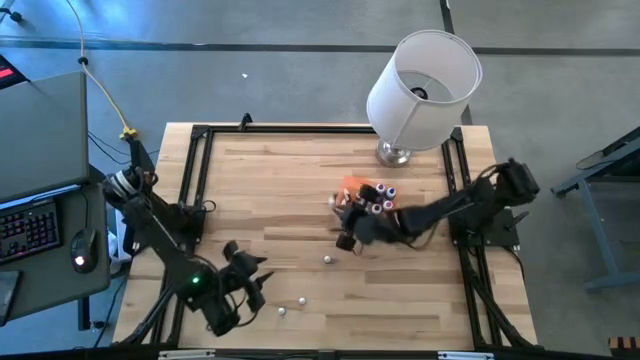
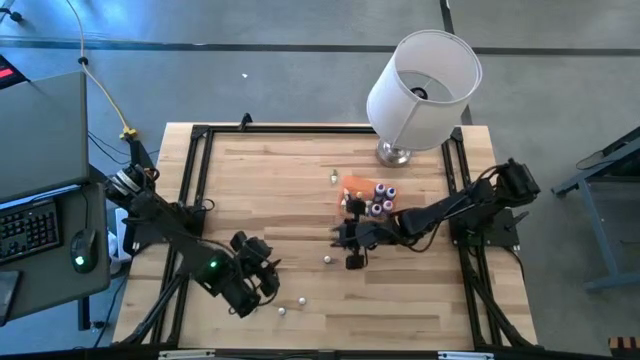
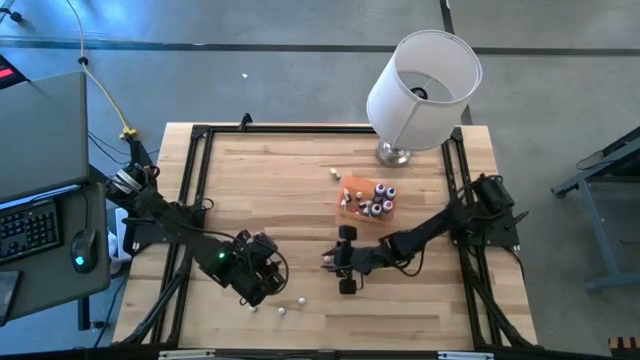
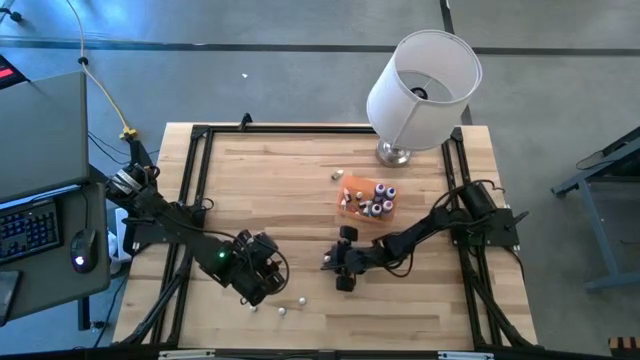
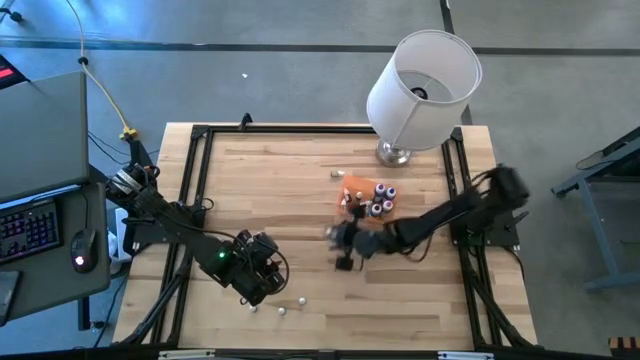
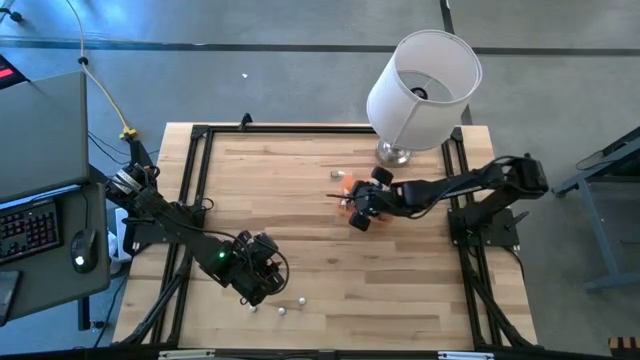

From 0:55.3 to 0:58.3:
Task: Pick & Place food coloring
Put the top small purple food coloring bottle into the orange container

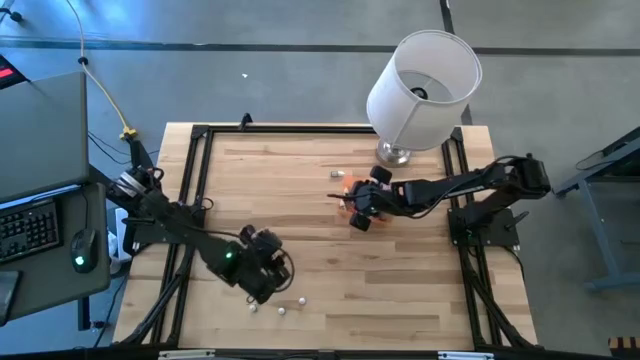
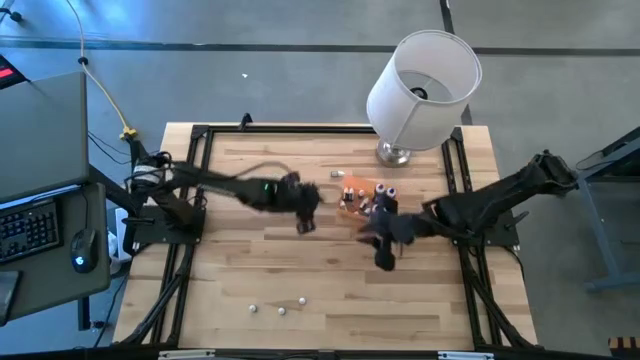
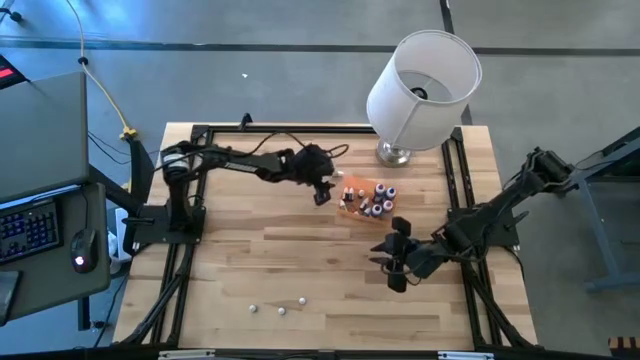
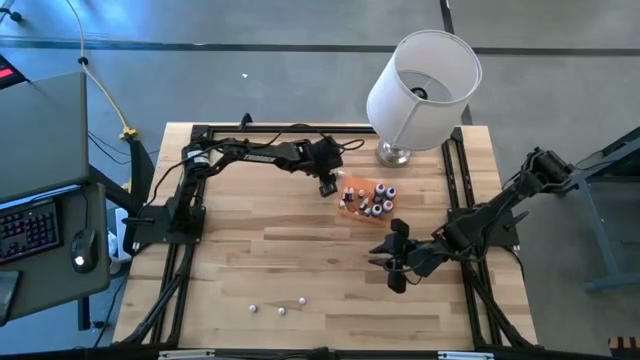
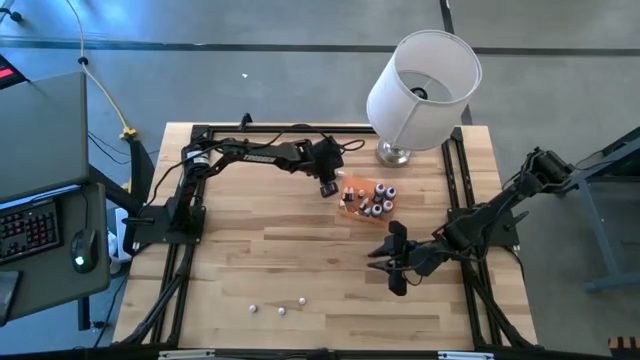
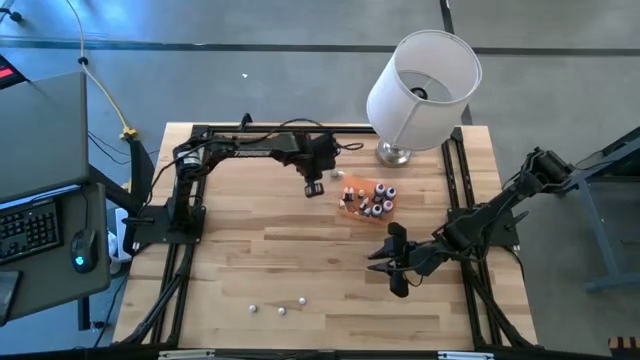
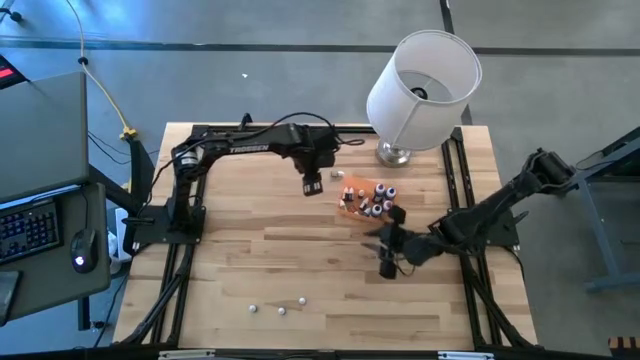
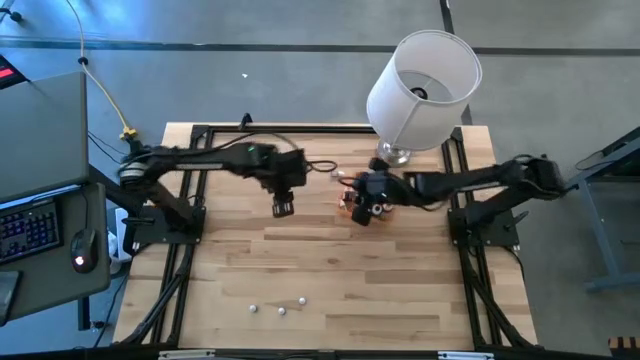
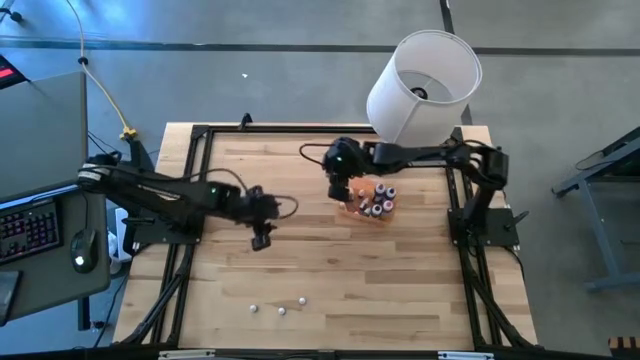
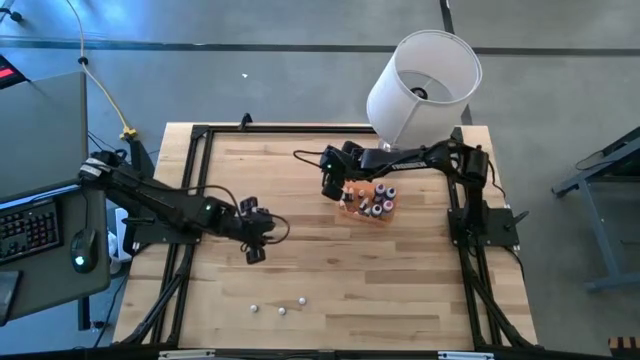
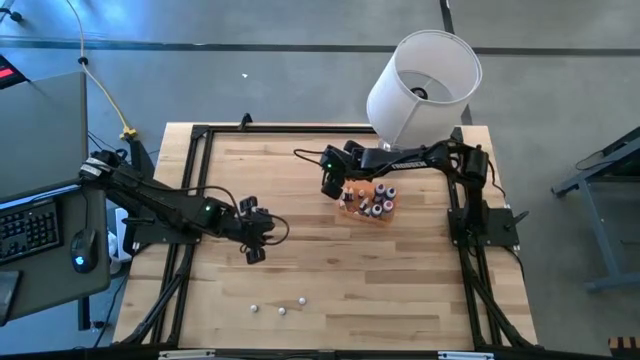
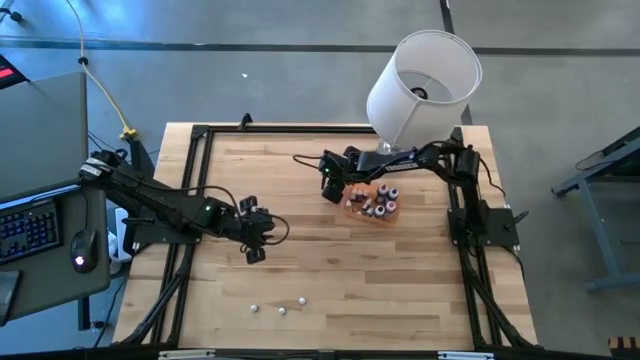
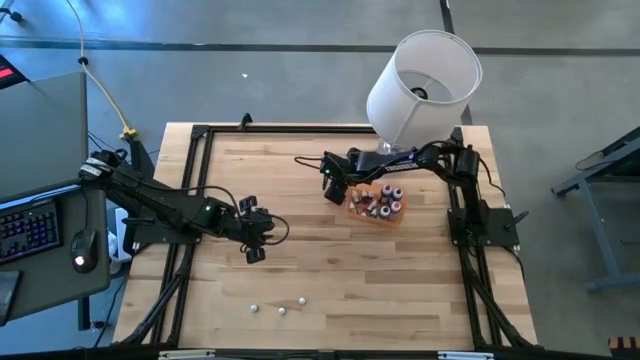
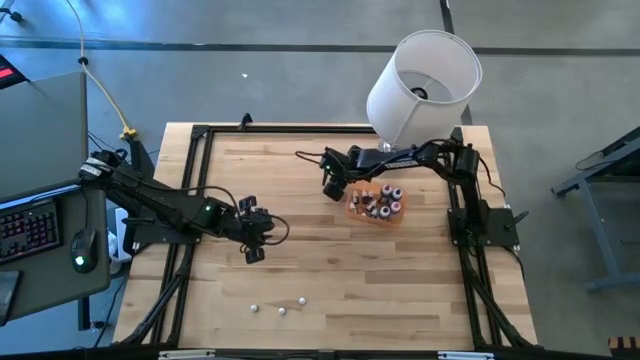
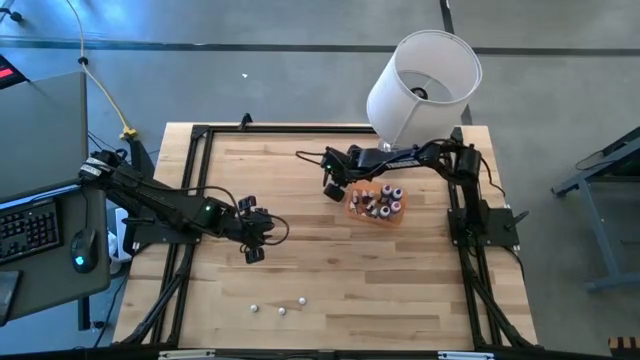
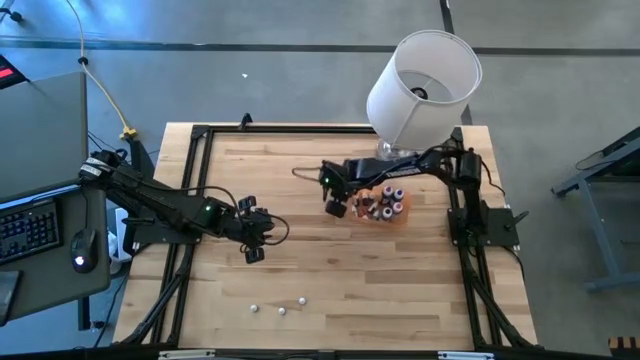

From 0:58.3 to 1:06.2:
Put the small green food coloring bottle into the orange container

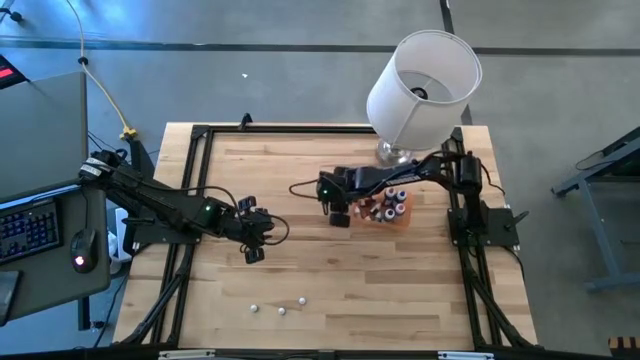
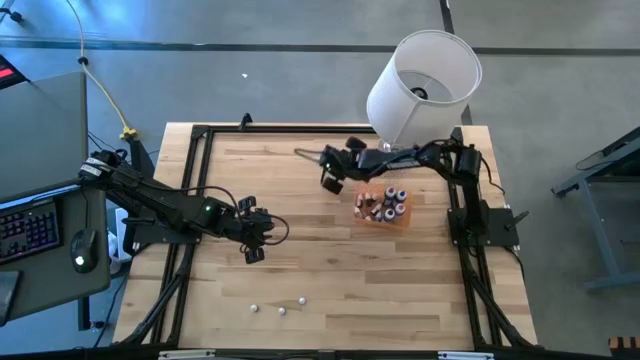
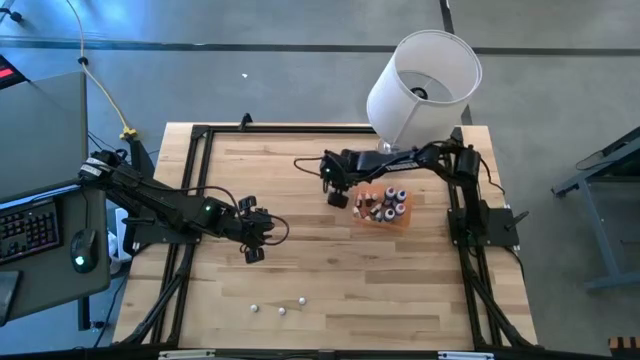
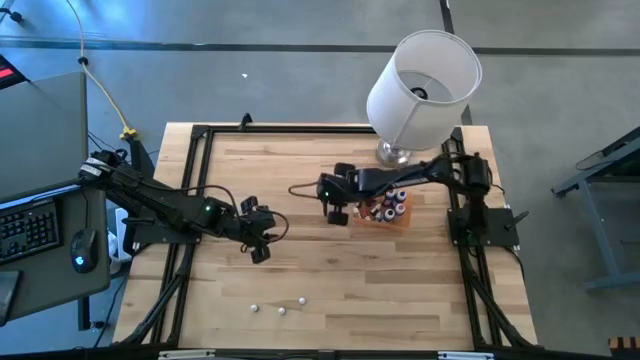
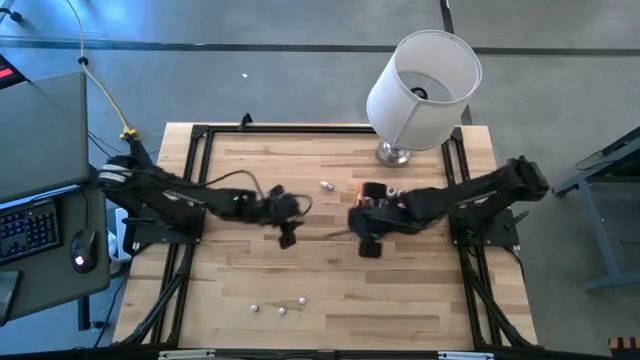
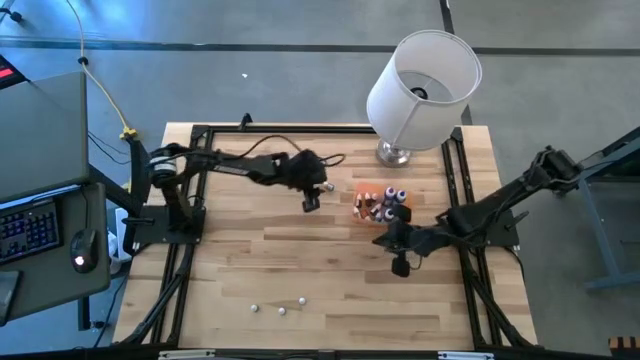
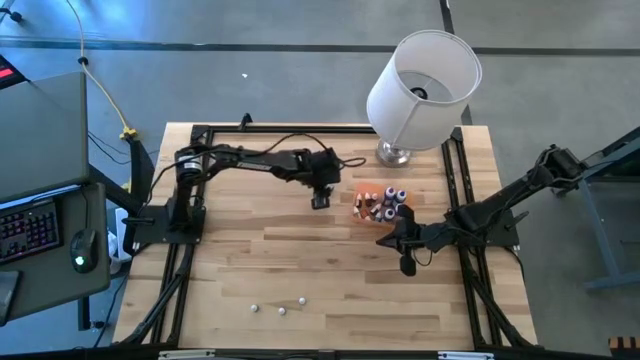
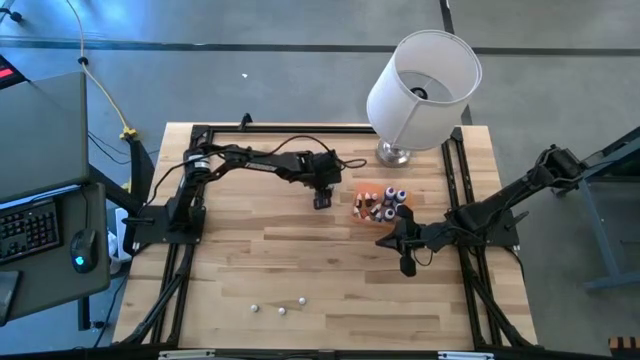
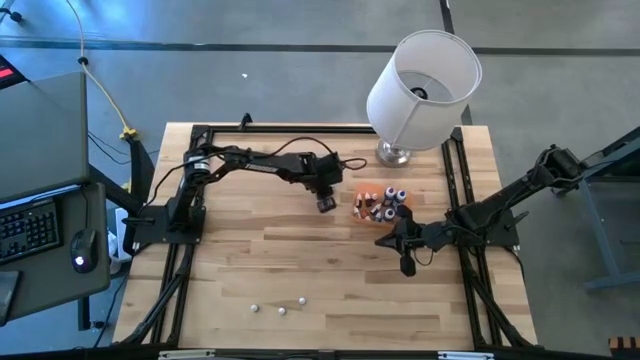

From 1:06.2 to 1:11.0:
Put the small green food coloring bottle into the orange container

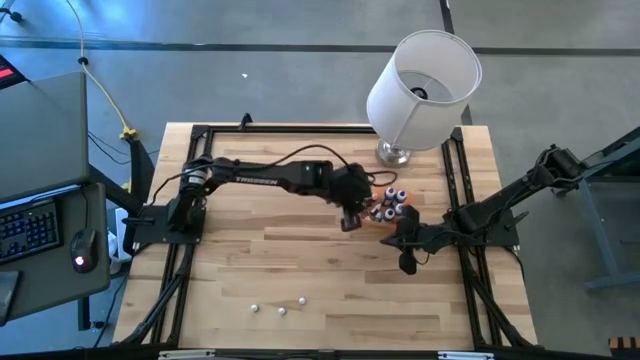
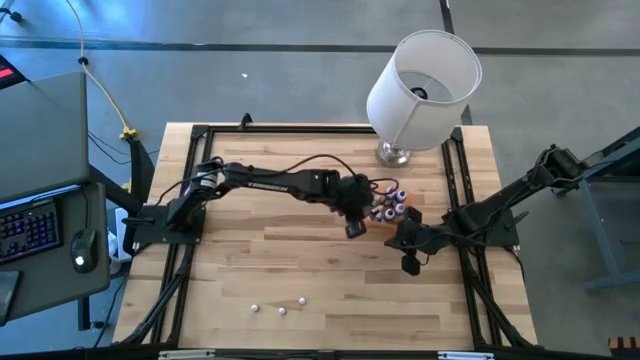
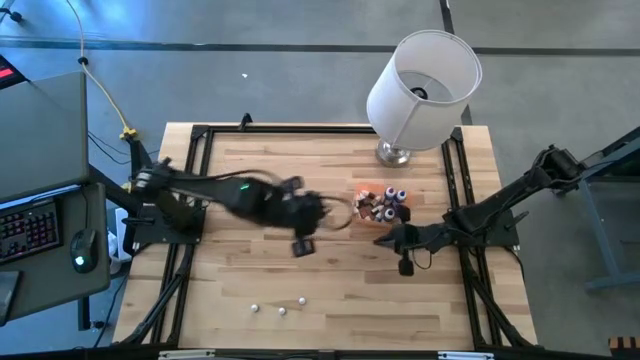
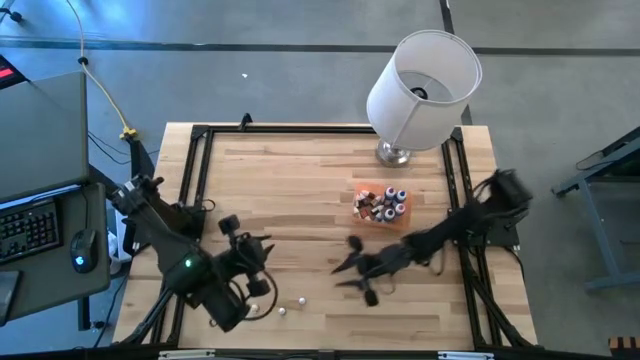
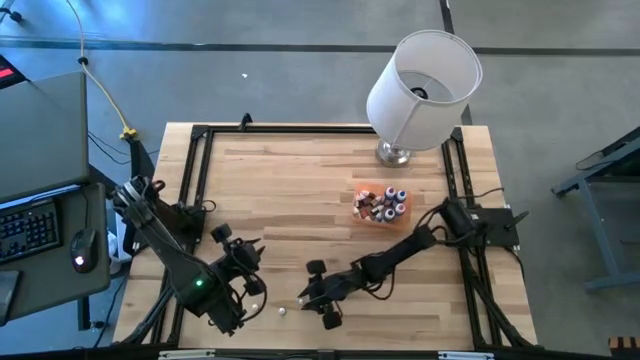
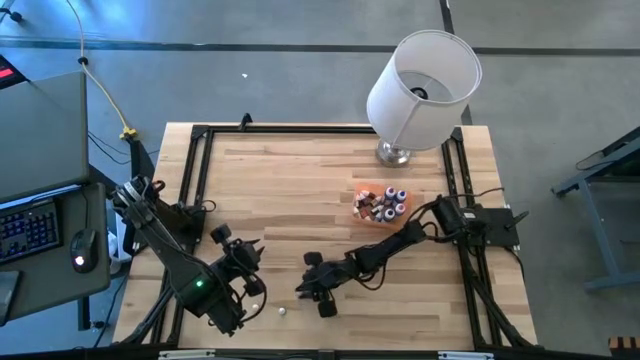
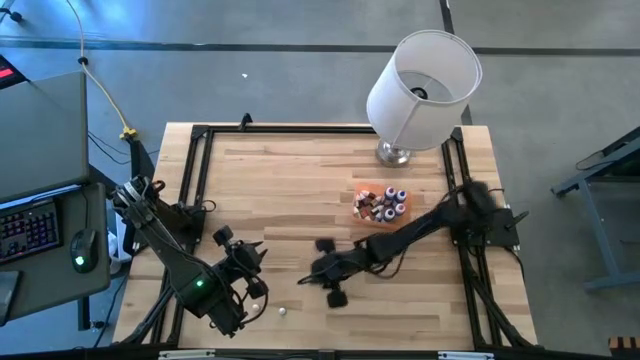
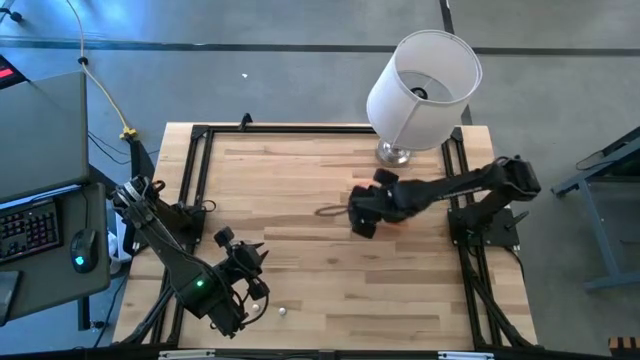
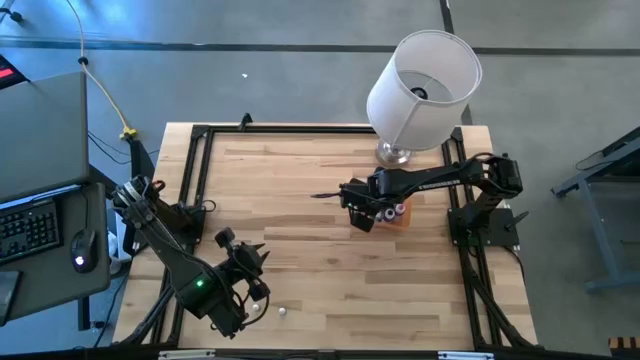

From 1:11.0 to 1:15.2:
Put the small red food coloring bottle into the orange container

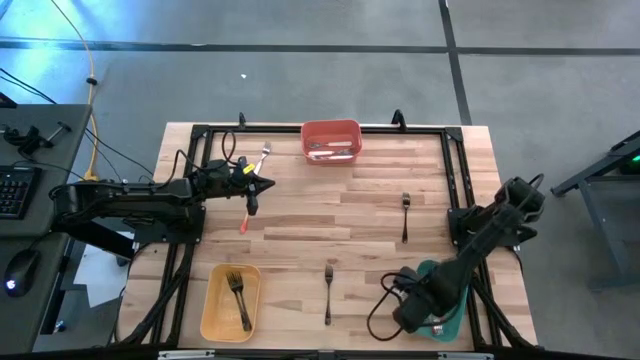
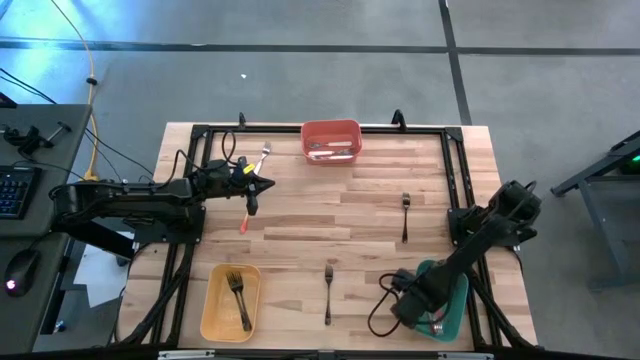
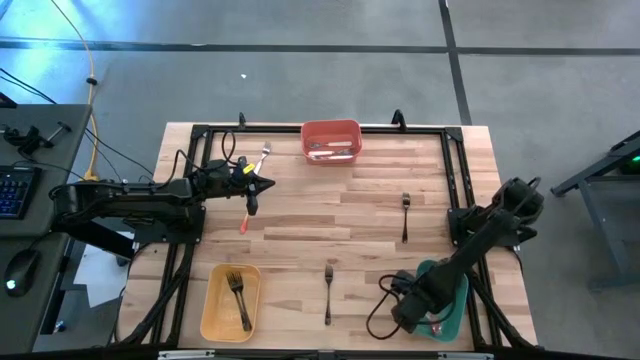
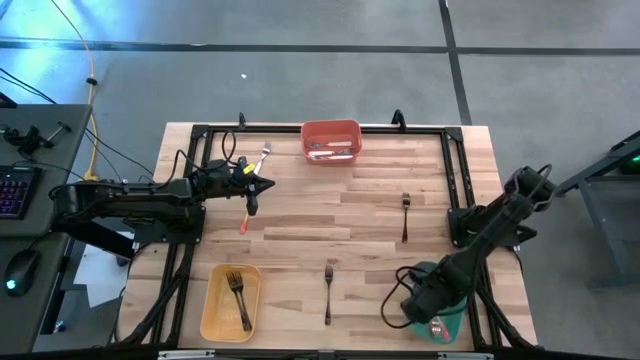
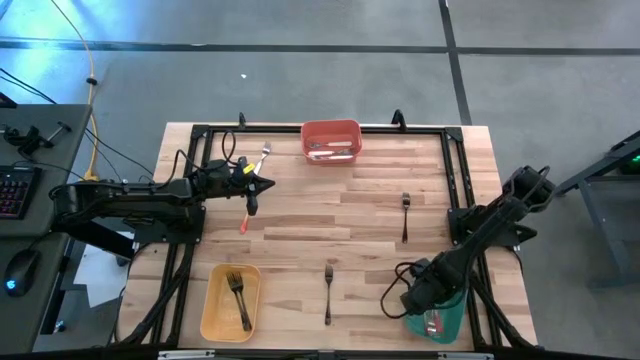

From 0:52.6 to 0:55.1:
Task: Sort silverware by color (type)
Put the top orange fork into the green bin
